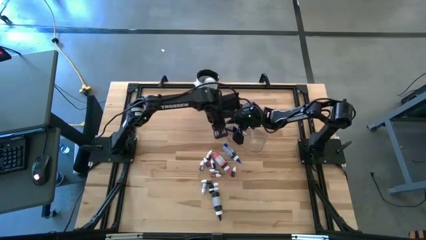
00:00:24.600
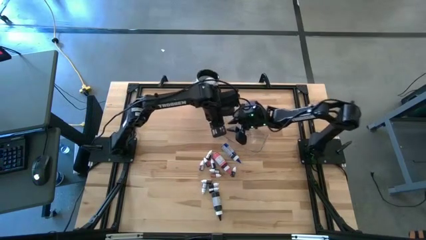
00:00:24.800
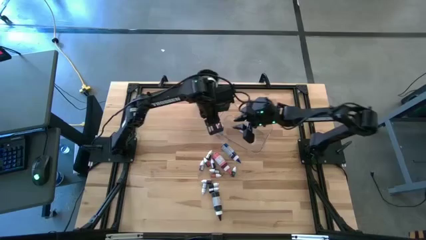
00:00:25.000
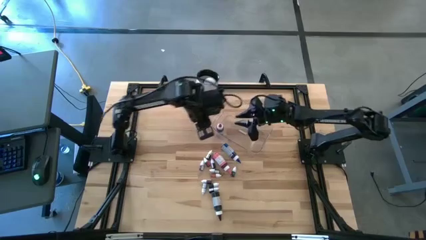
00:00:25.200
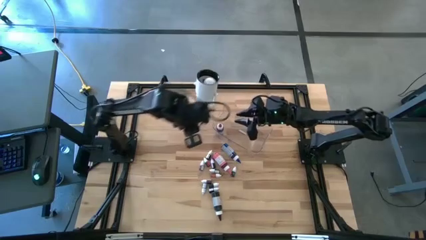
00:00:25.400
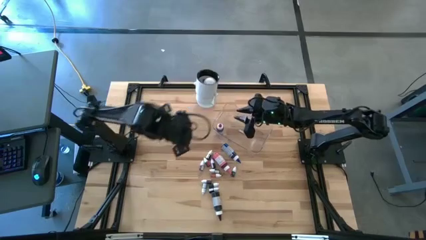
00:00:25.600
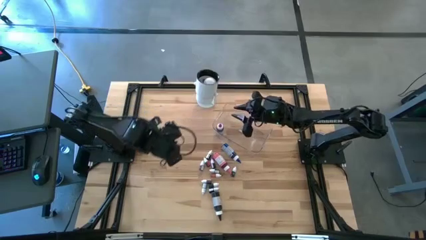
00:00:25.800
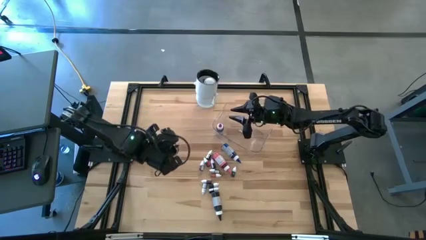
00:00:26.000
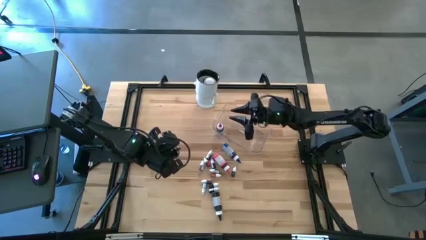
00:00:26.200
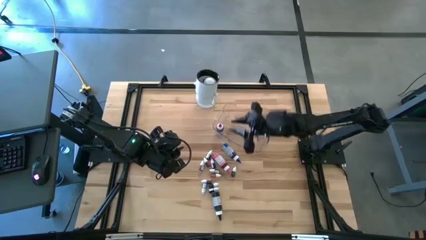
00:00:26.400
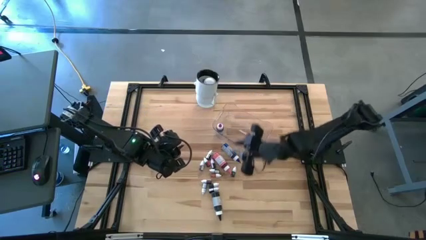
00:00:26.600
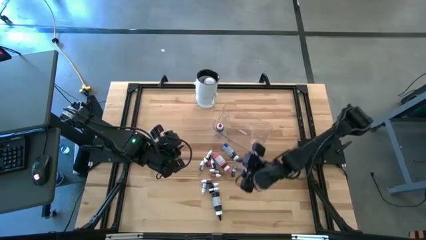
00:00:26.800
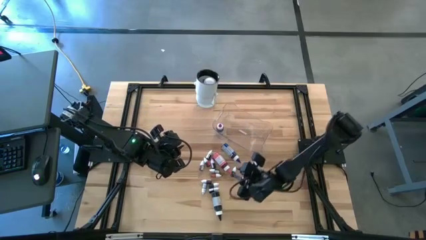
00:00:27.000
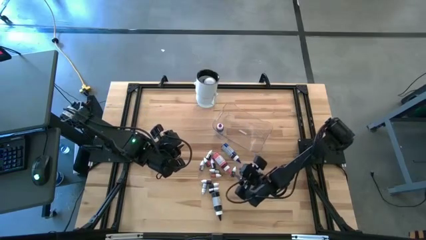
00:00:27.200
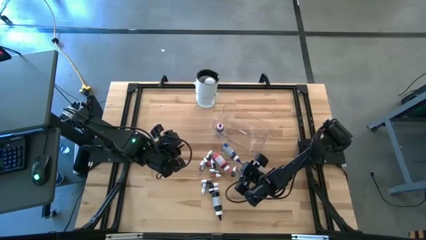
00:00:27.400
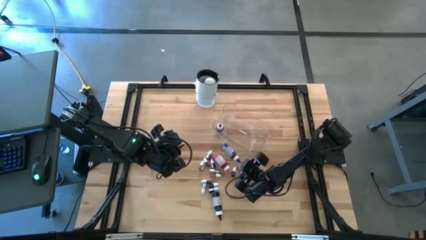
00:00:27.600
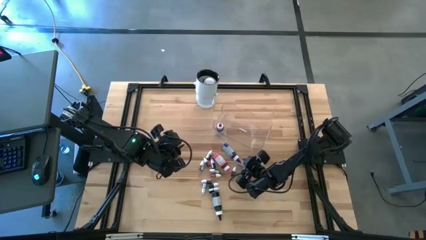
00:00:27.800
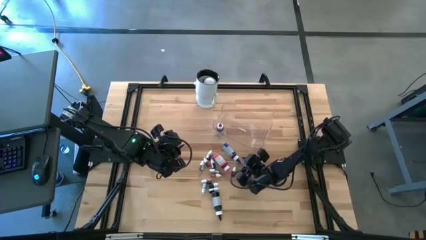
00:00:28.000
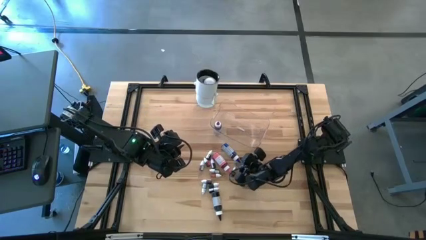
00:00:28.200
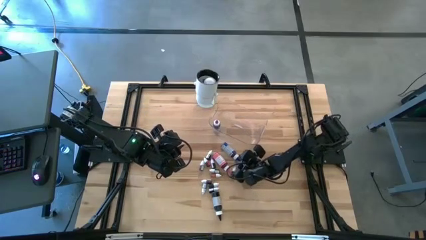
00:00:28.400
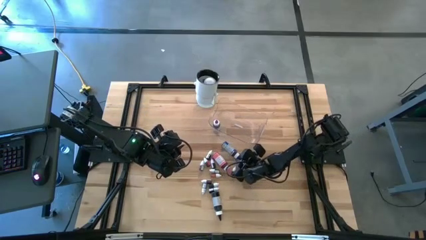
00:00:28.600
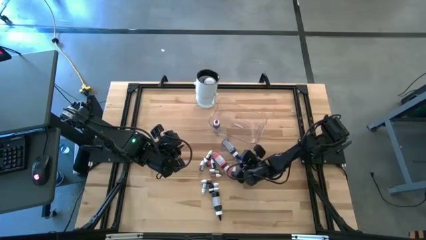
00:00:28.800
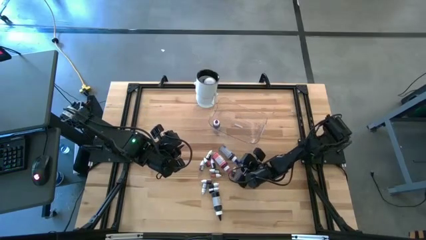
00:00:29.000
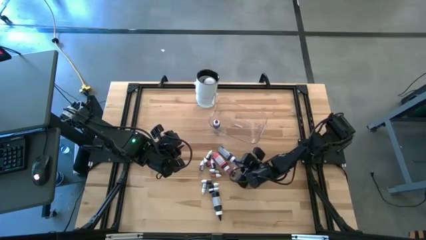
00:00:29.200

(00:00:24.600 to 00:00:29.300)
Task: Pick & Place food coloring
Put the large blue food coloring bottle into the transparent container

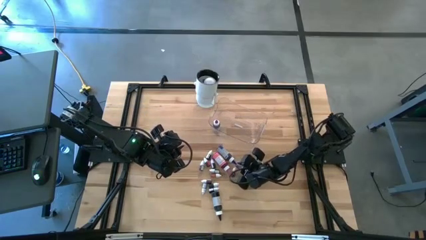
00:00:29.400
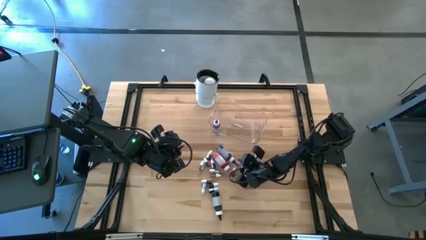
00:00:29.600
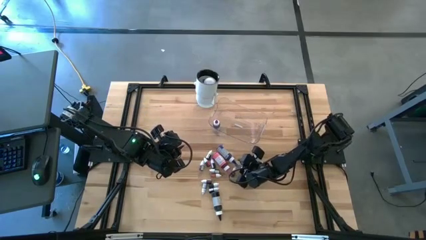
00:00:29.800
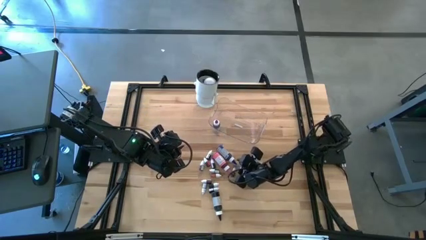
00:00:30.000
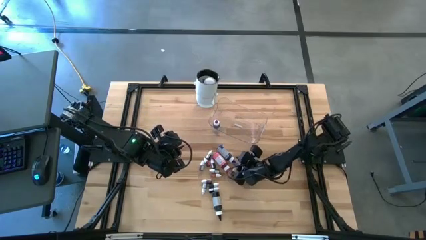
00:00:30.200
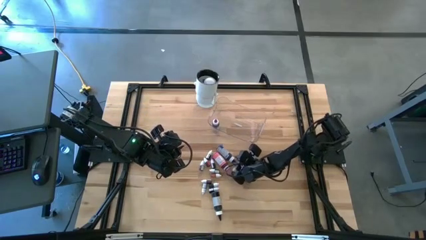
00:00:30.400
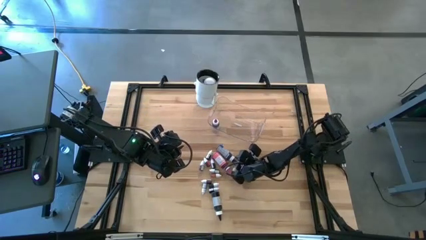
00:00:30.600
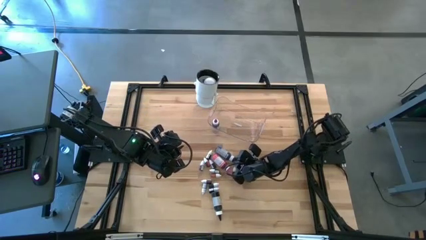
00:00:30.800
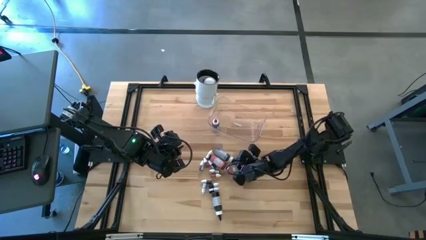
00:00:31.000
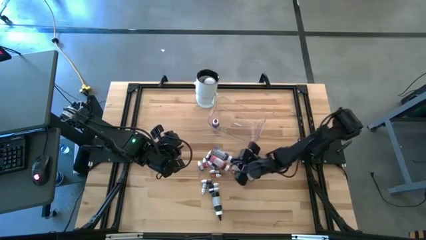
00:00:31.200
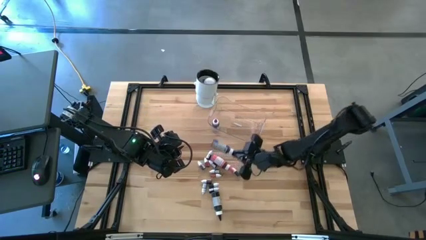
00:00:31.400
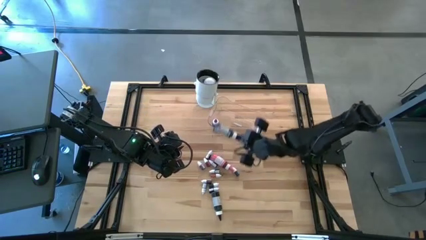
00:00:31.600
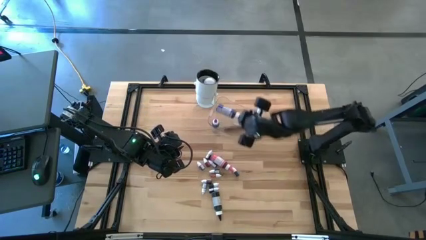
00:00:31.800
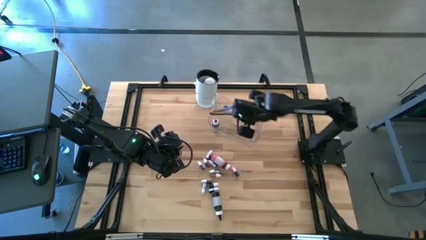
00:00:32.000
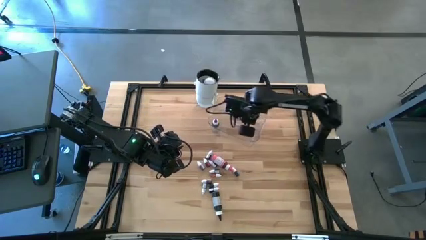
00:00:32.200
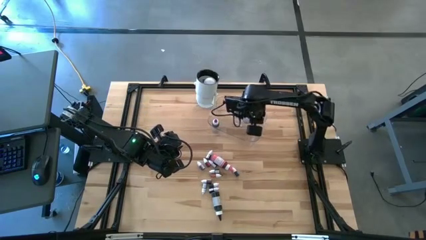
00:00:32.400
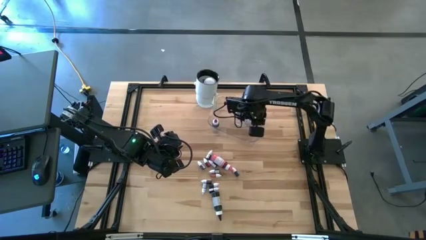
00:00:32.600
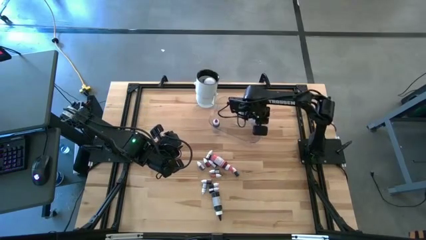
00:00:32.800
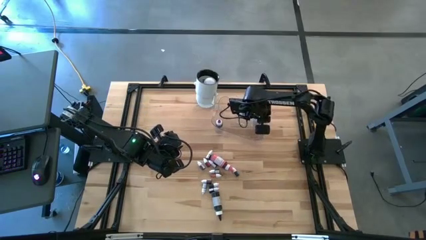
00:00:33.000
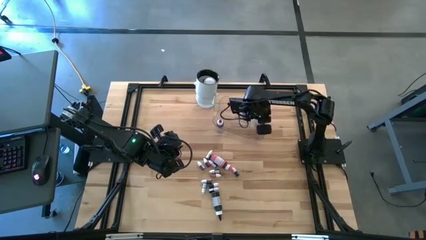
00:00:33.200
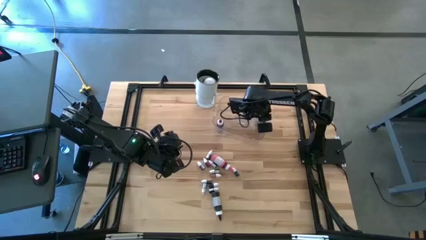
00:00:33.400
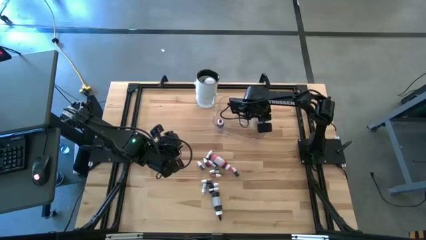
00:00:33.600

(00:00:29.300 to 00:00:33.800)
Put the large blue food coloring bottle into the transparent container

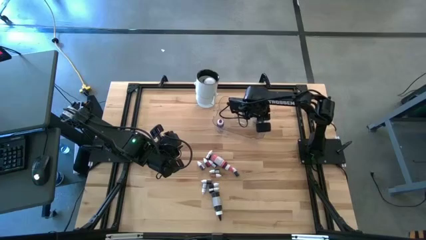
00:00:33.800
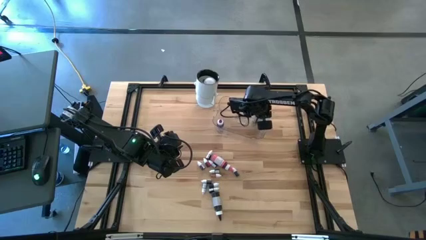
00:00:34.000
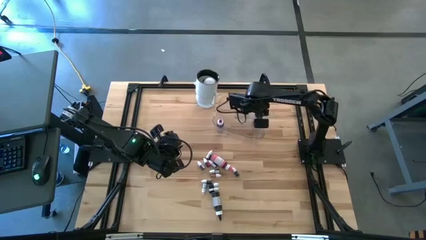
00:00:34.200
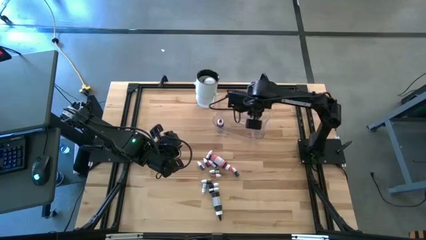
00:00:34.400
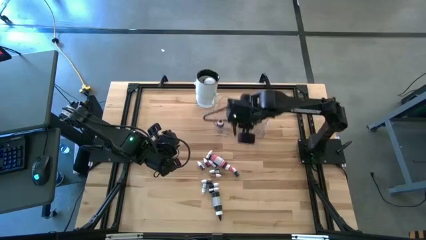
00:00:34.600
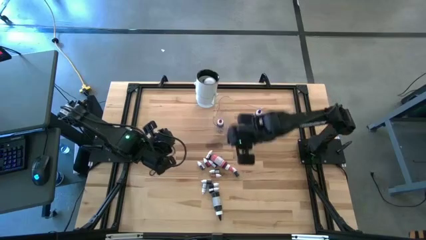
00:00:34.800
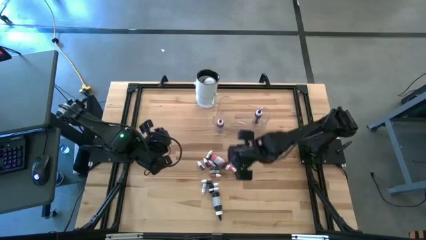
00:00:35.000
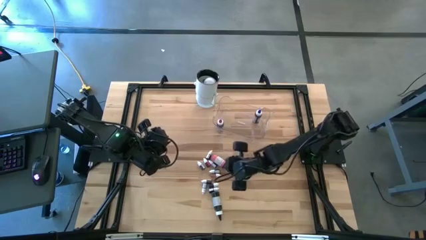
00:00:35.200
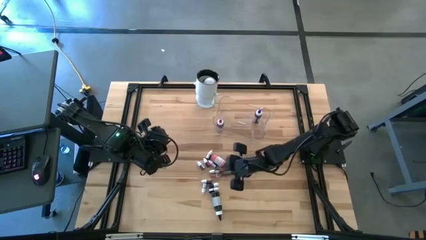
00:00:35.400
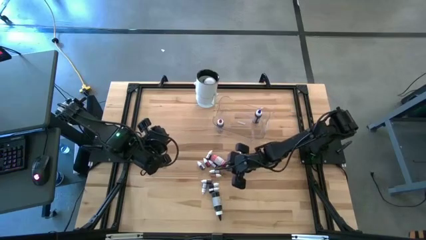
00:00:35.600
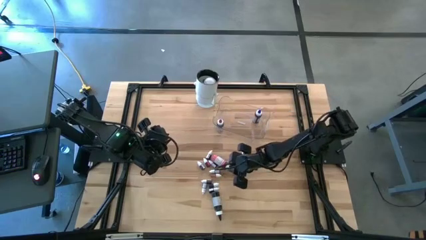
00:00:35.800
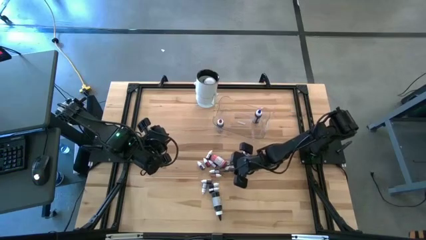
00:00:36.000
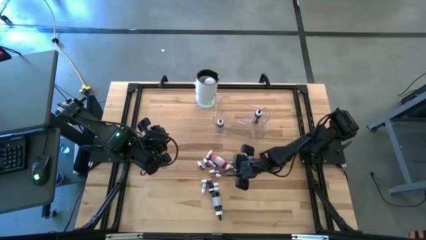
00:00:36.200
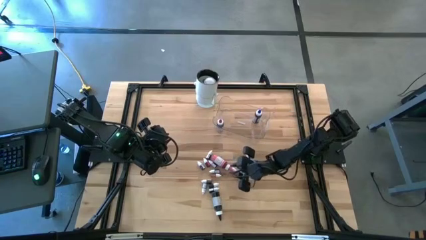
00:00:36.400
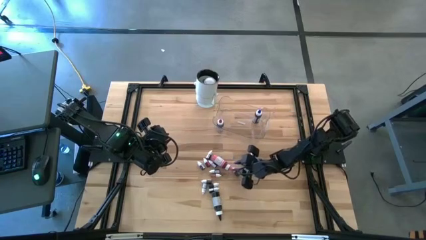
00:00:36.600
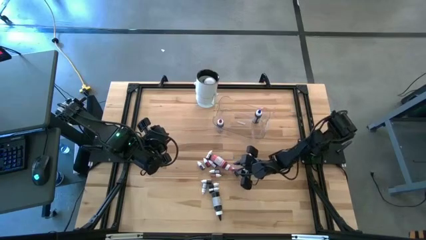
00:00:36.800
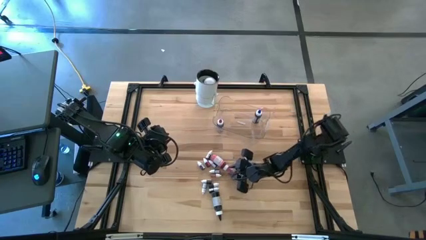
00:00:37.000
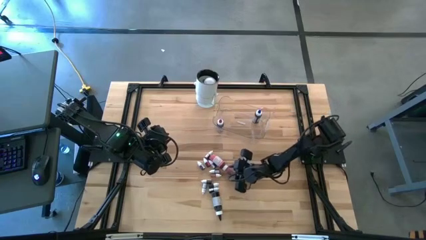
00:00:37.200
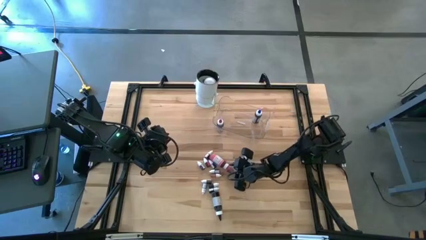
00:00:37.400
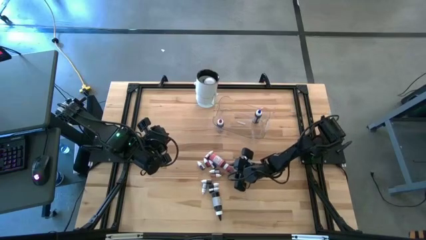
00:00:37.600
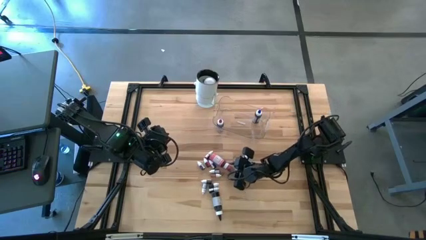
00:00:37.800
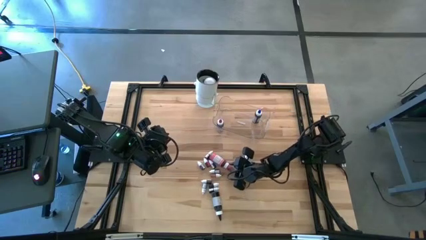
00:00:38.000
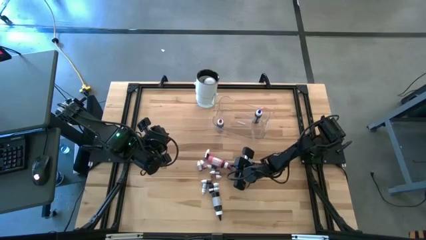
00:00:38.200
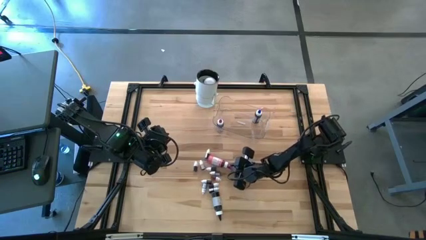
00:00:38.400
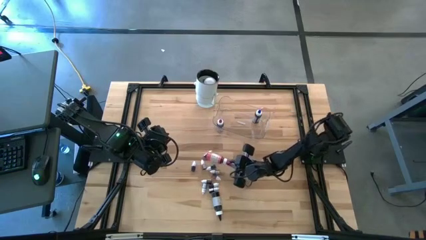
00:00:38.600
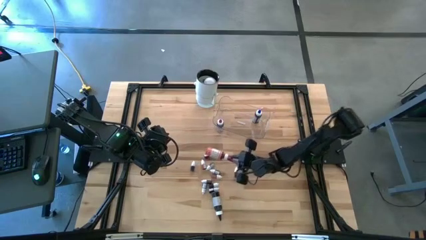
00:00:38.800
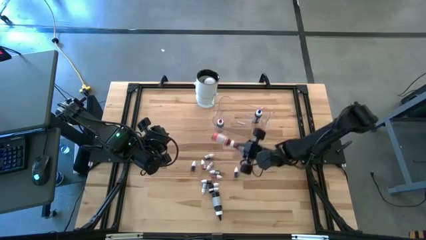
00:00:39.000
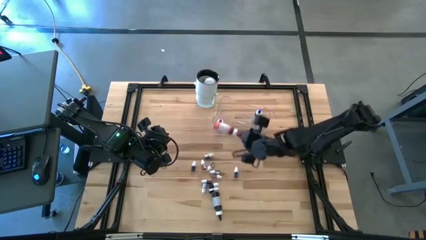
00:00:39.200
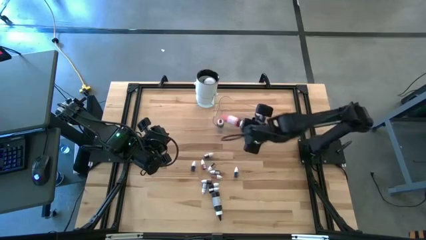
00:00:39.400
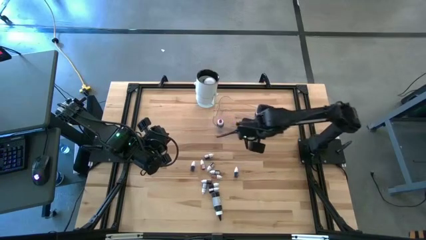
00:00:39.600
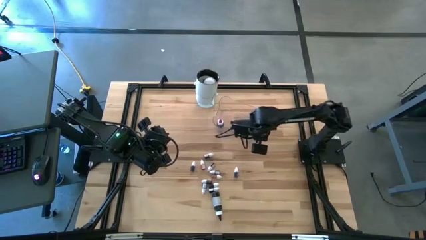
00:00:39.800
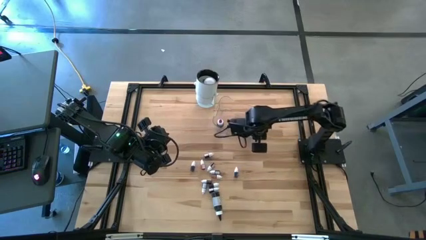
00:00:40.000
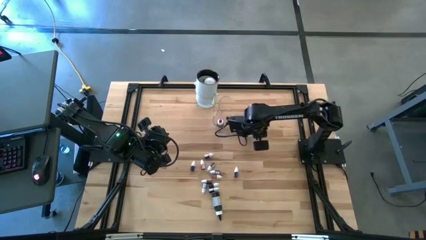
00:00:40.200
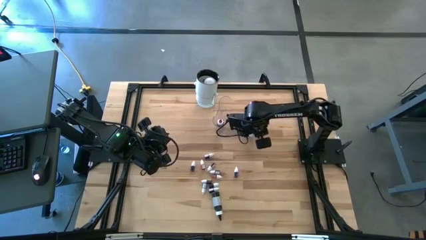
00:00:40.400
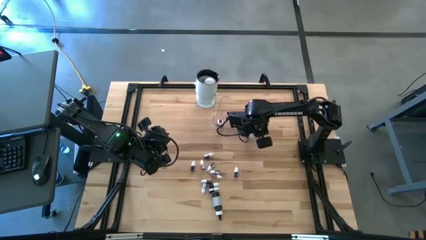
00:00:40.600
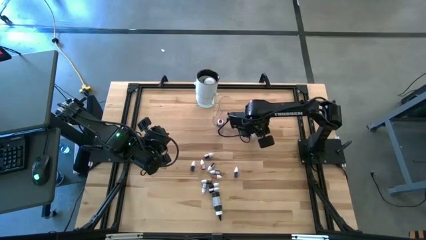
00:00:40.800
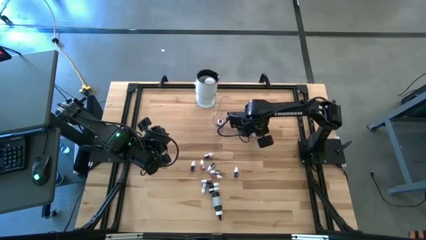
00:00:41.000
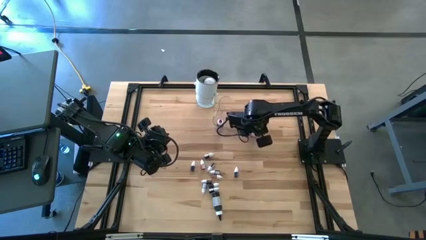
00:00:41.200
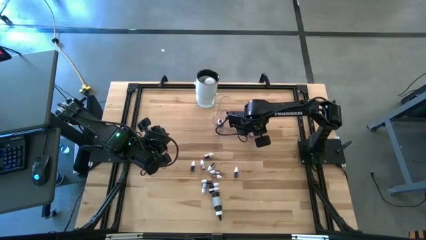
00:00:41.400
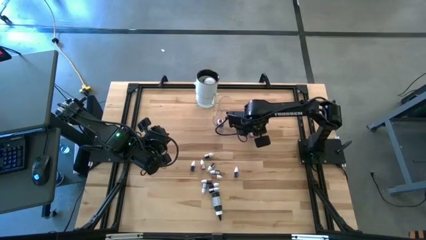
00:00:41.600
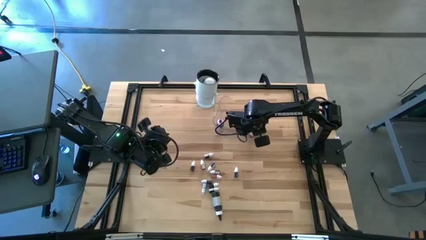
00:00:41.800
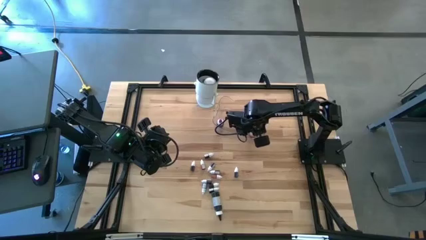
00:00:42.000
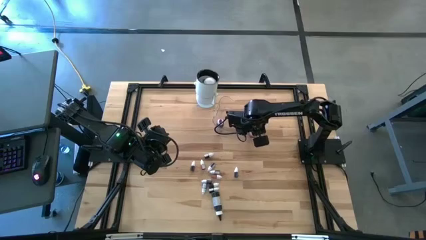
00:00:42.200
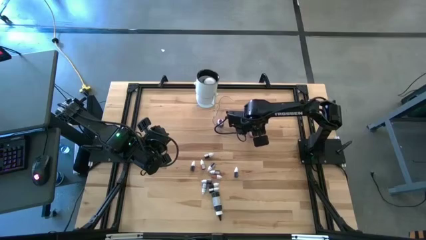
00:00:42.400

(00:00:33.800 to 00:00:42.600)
Put the large pink food coloring bottle into the transparent container
